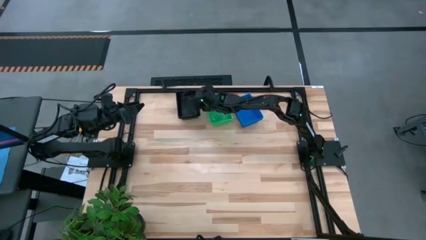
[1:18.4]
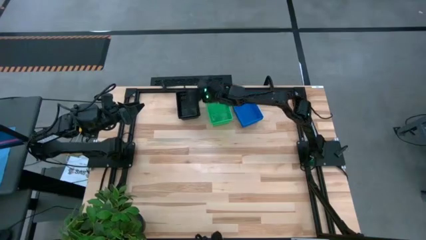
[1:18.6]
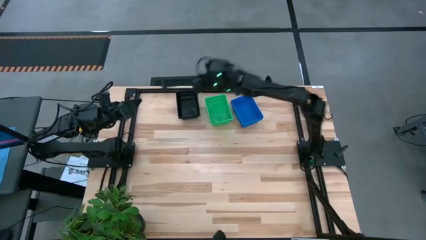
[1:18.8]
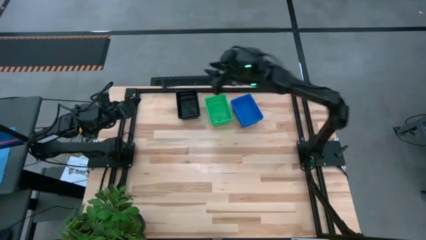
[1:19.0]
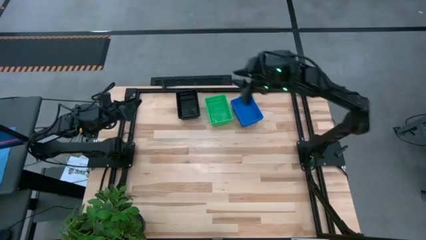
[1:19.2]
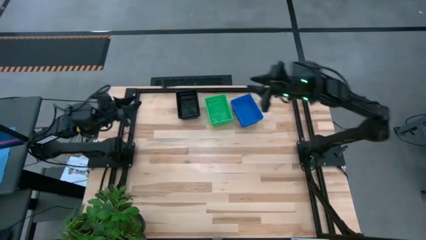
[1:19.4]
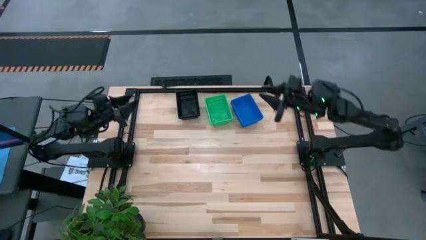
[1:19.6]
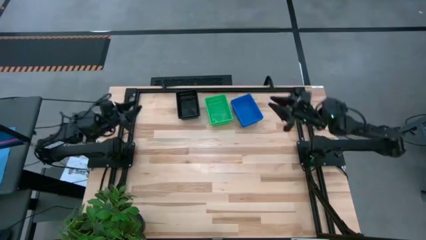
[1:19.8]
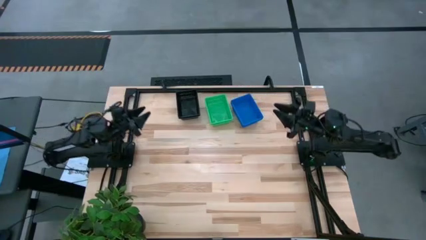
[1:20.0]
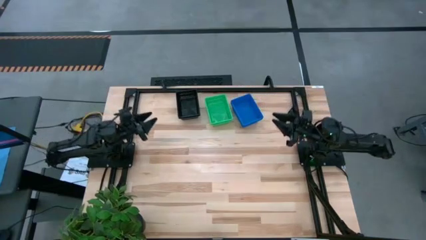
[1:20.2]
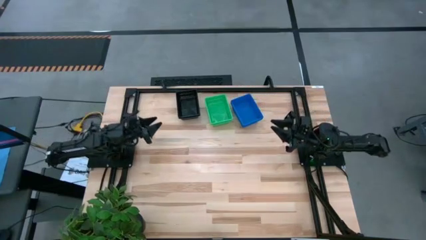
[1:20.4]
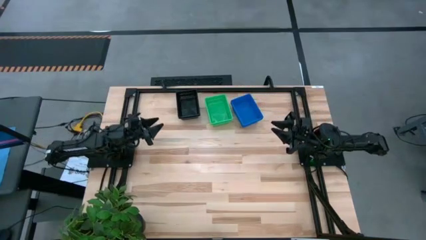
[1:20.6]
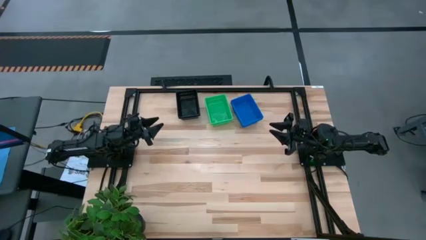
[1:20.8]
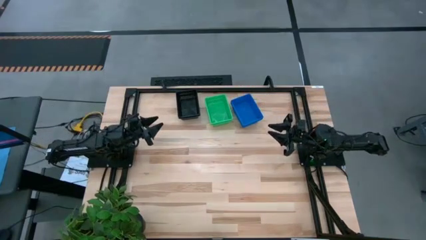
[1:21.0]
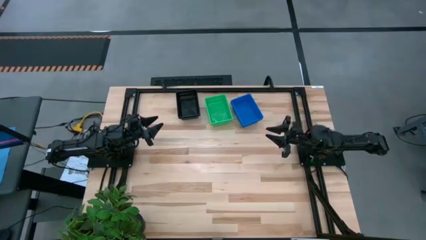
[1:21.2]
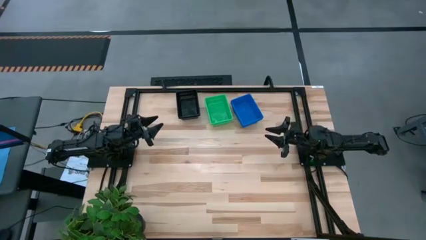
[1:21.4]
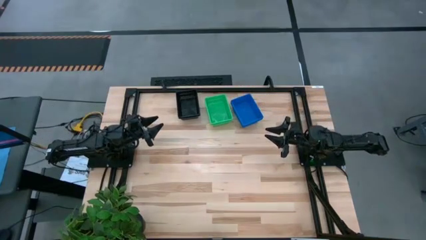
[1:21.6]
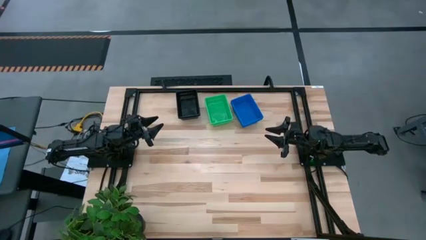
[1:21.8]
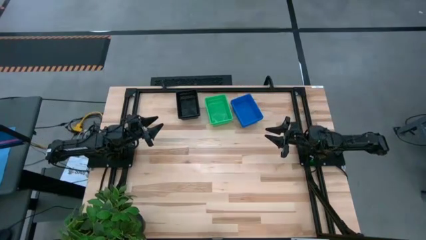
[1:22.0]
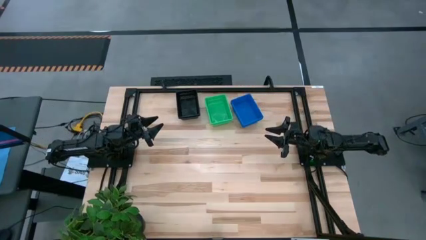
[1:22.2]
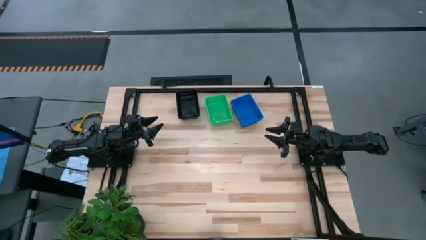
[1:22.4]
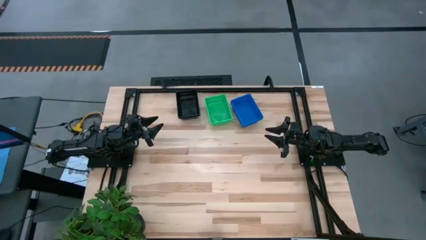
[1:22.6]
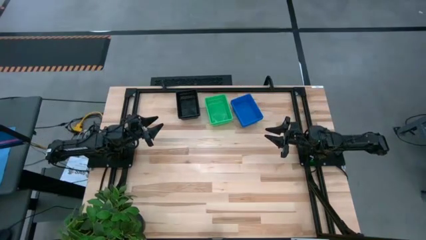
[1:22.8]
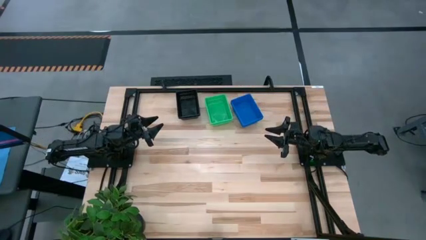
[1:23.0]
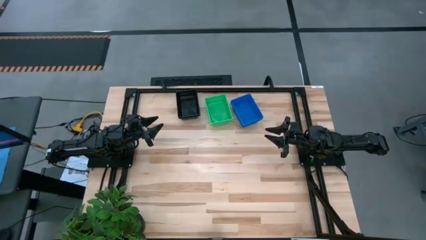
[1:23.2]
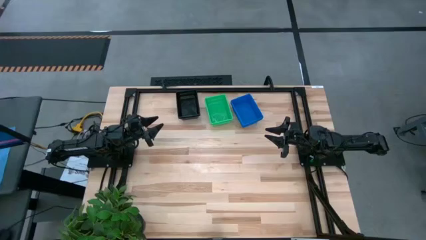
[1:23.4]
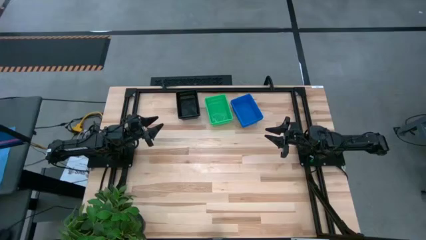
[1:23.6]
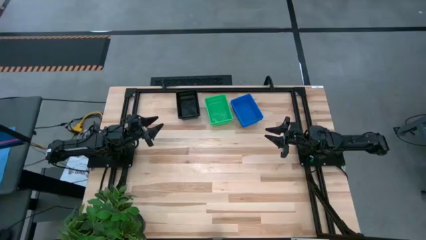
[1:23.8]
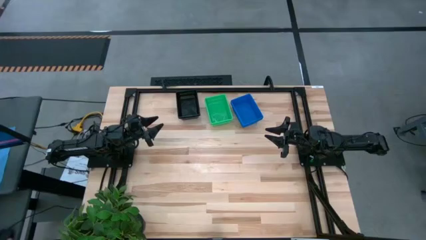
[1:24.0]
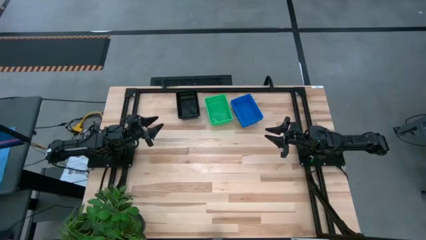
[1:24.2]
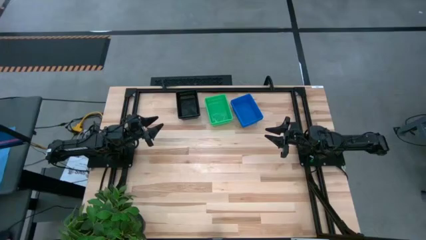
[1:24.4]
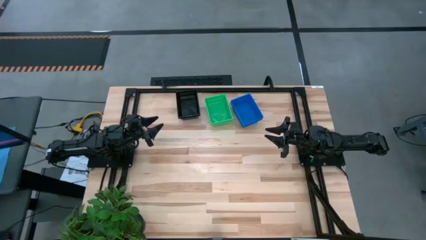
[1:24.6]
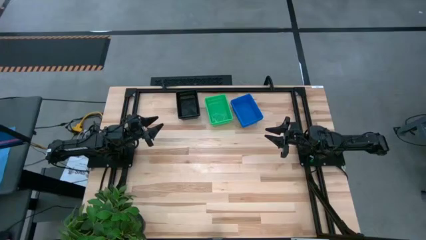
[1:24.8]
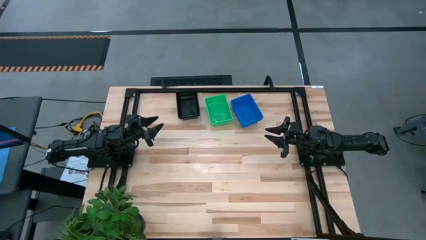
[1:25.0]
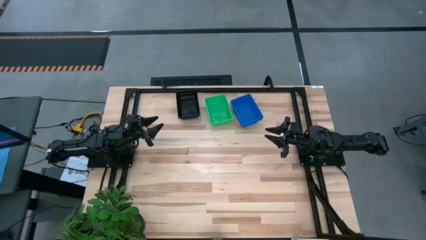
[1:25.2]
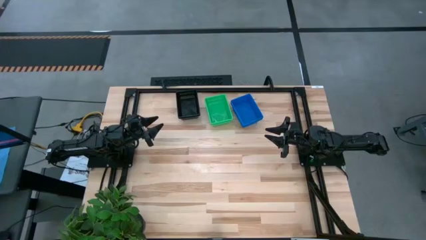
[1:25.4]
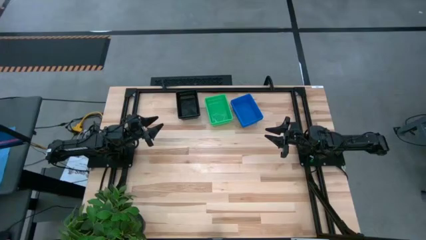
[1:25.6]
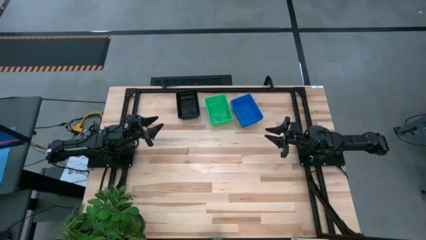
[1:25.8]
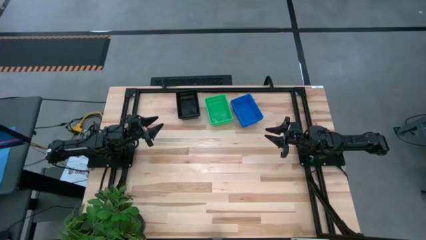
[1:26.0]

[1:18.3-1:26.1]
Return to Home Position

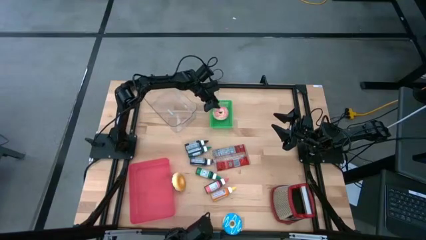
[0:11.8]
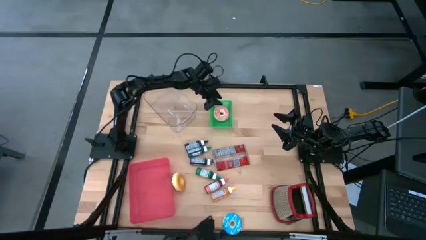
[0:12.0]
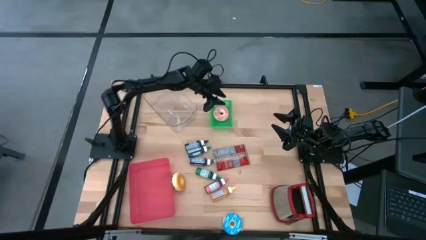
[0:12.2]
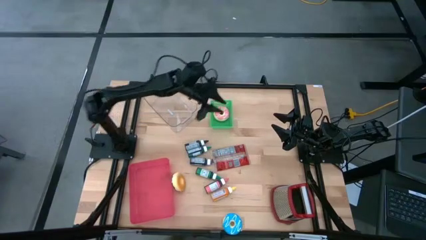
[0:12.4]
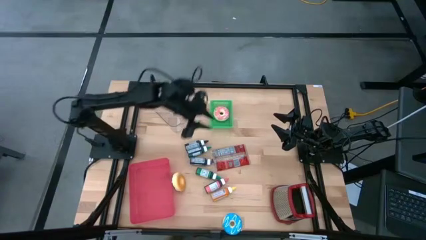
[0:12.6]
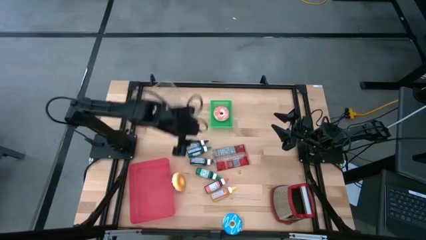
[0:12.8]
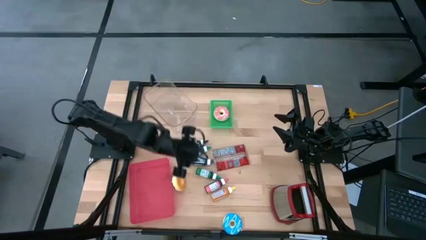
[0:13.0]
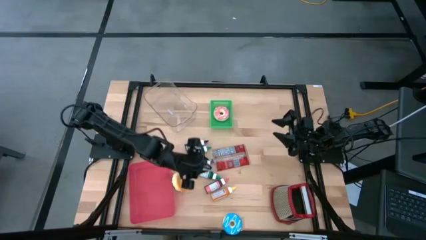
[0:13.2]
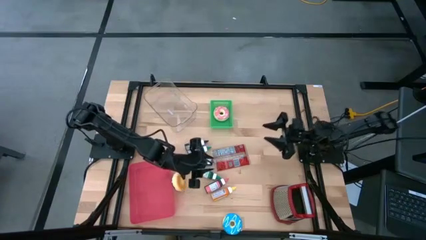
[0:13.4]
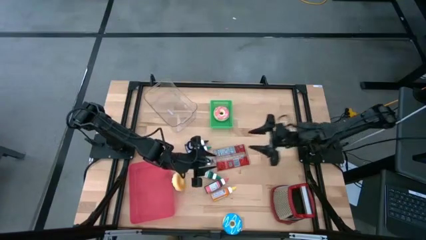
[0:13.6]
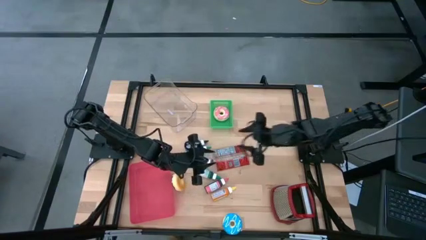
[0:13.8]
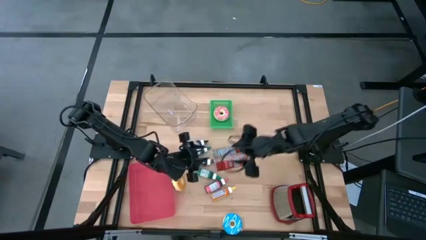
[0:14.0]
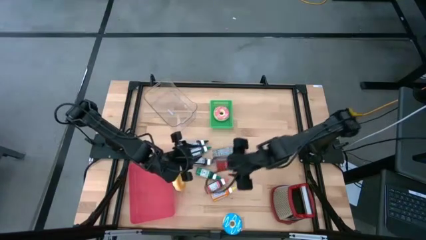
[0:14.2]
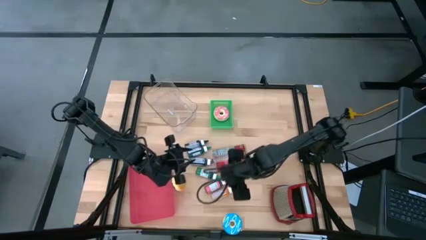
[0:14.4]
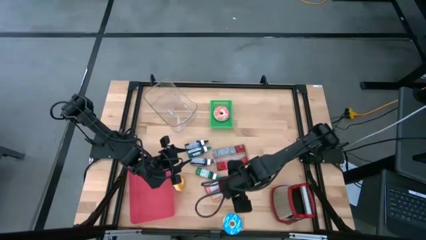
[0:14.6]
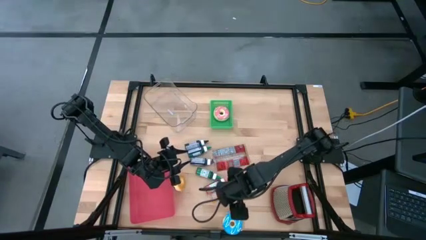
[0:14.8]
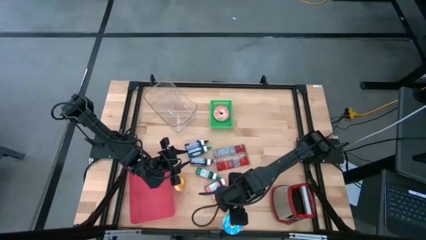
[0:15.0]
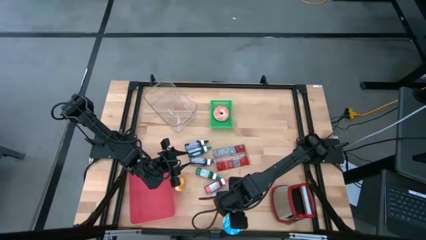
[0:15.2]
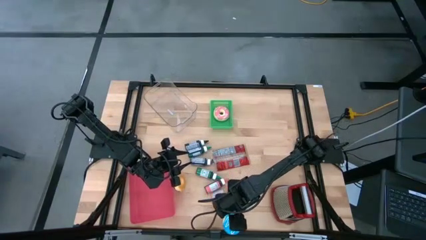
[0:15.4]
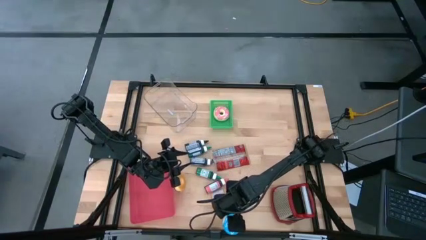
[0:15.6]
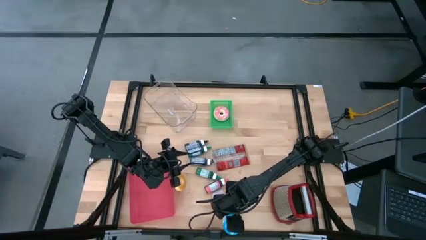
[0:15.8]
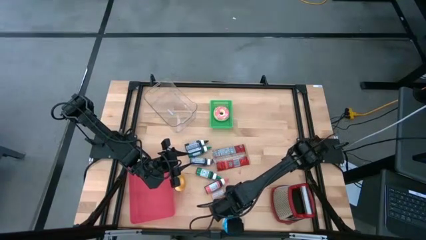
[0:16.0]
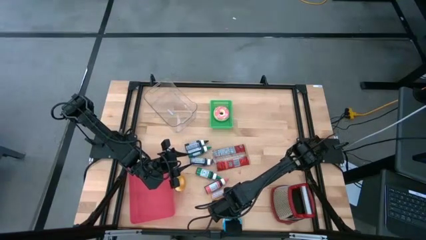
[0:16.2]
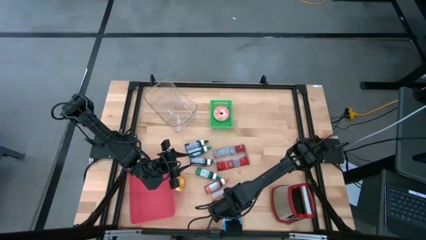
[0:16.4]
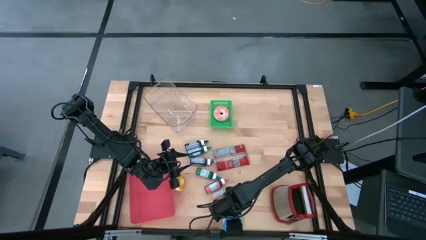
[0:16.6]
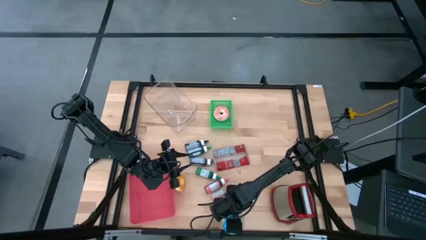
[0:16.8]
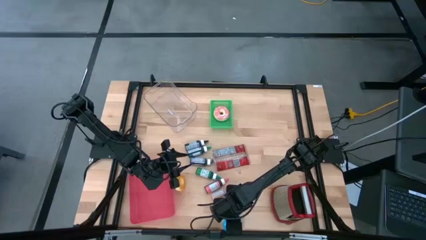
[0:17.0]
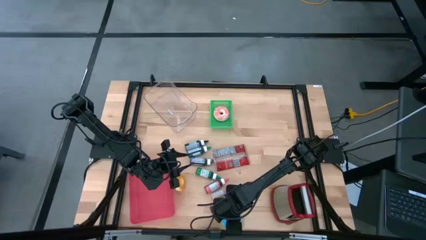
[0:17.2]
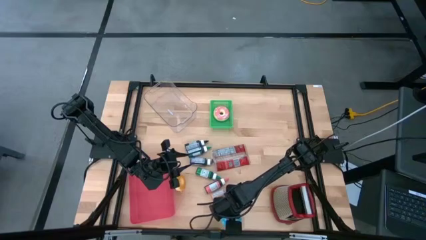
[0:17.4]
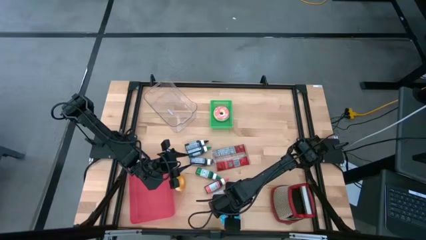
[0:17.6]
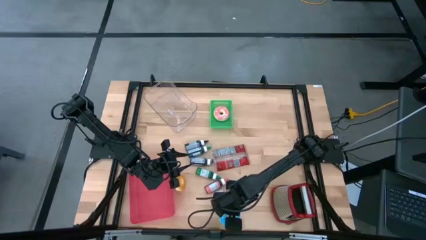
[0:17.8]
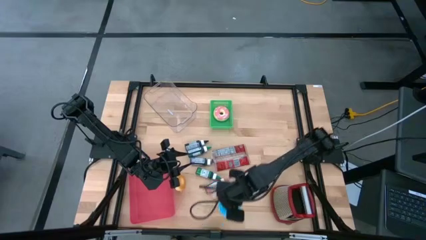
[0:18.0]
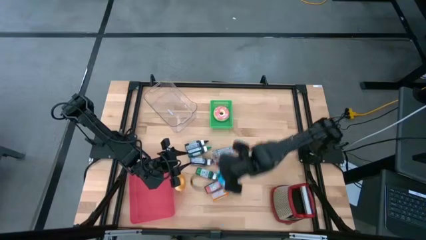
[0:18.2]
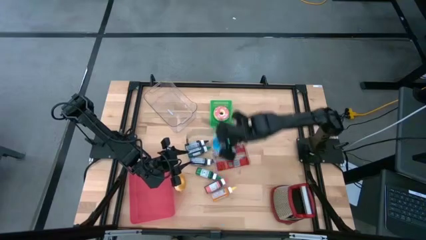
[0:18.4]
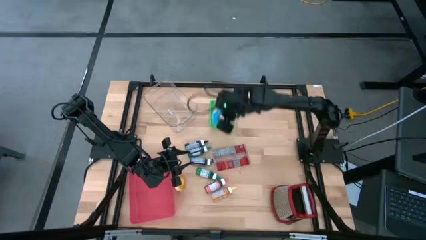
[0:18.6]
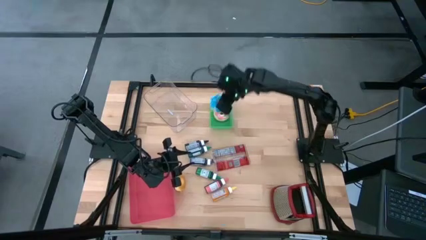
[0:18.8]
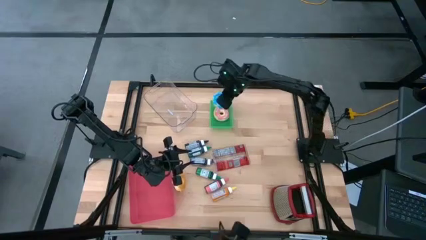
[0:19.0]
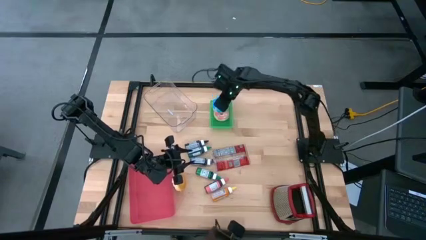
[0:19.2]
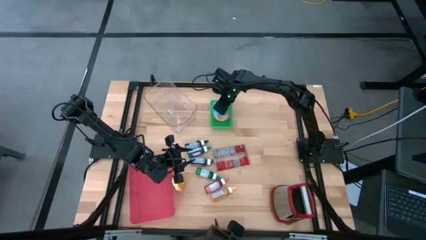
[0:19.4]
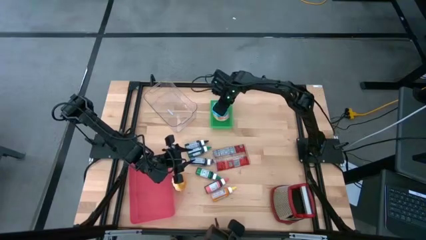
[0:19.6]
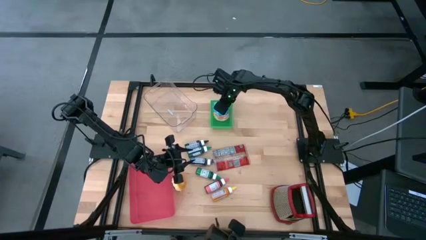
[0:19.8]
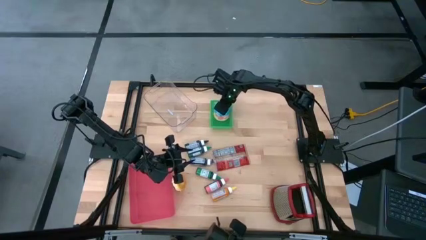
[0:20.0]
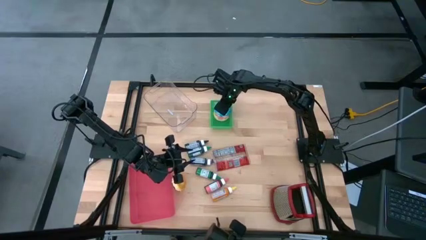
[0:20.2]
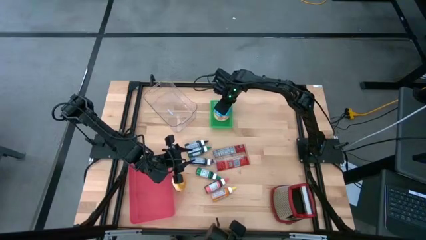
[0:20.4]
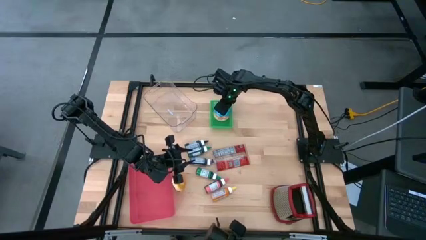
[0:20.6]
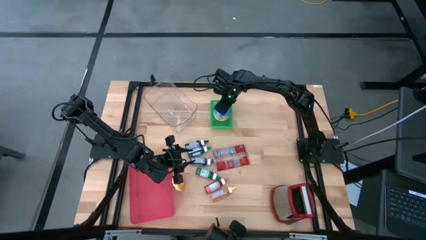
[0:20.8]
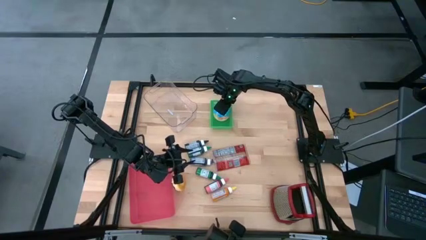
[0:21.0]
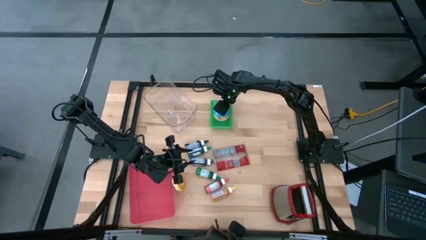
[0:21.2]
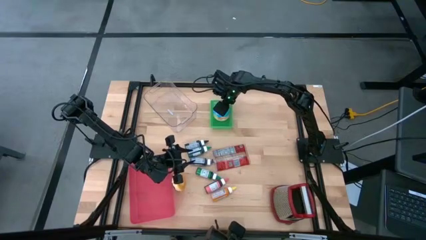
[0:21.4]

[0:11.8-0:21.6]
Put the blue donut into the green basket
